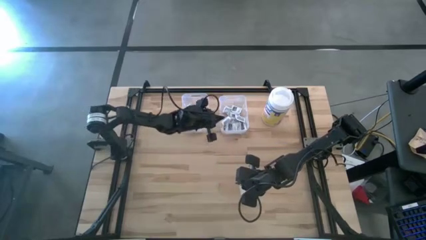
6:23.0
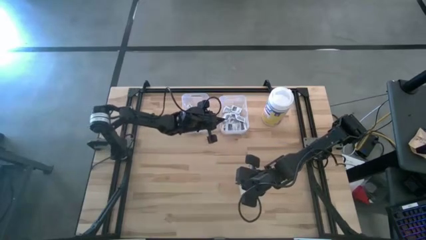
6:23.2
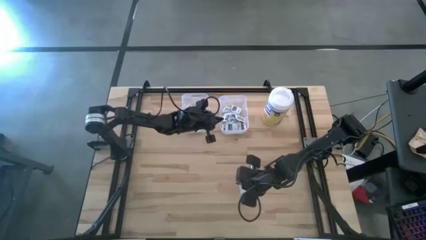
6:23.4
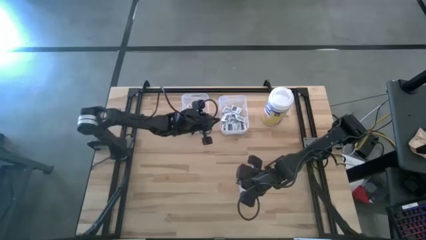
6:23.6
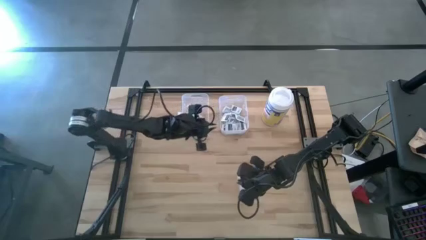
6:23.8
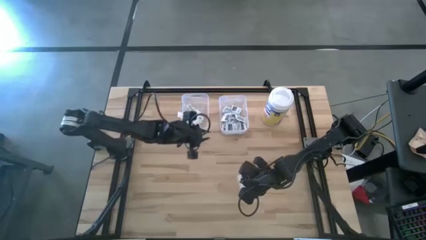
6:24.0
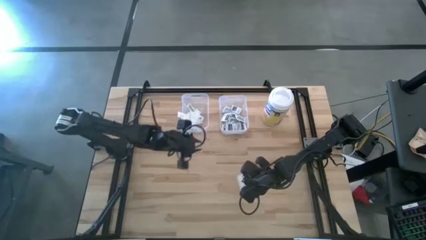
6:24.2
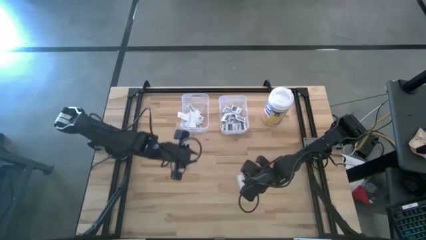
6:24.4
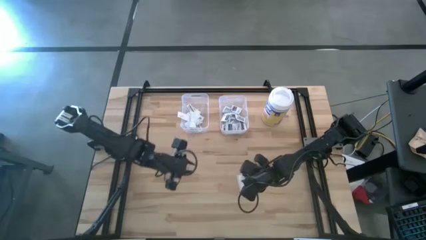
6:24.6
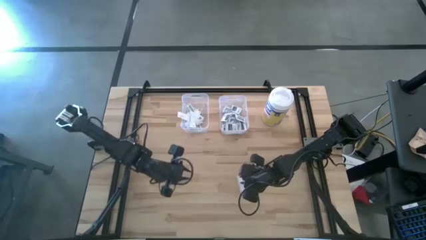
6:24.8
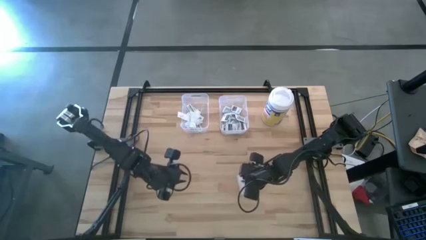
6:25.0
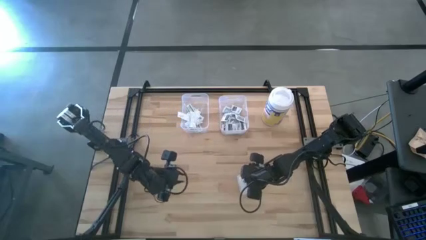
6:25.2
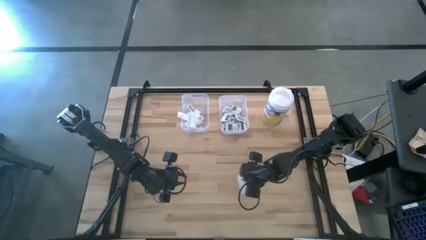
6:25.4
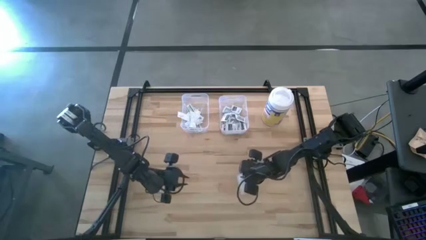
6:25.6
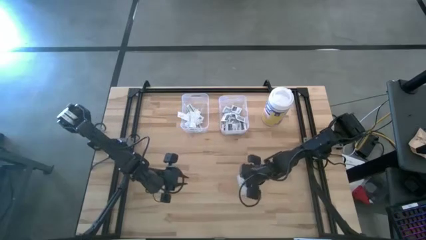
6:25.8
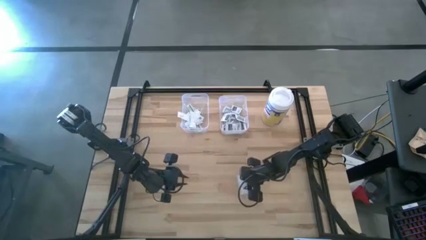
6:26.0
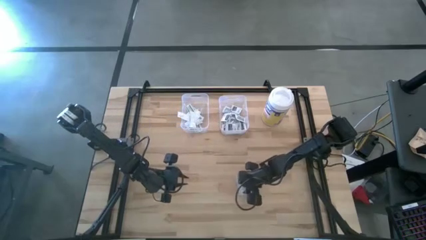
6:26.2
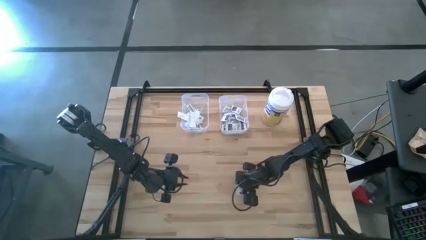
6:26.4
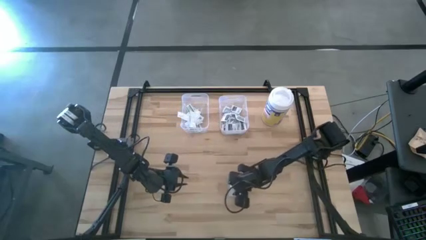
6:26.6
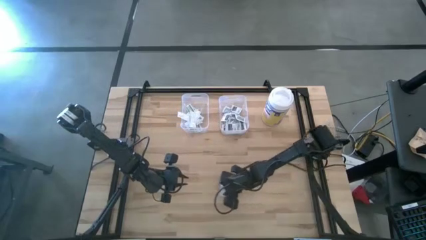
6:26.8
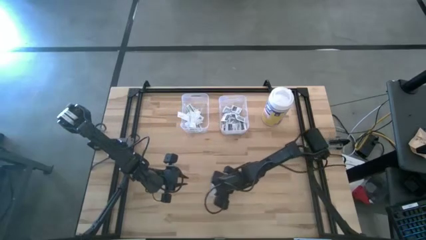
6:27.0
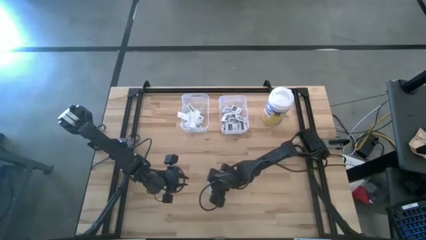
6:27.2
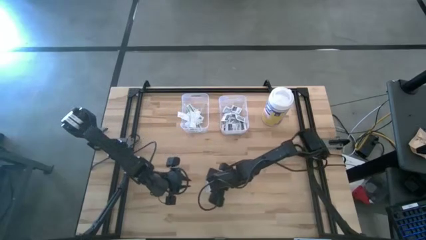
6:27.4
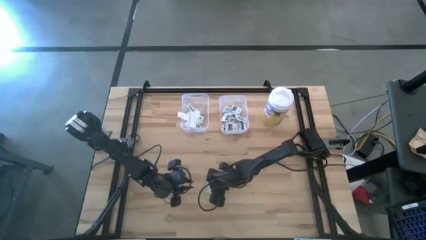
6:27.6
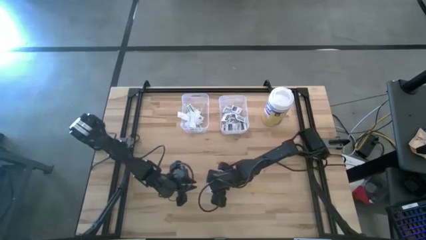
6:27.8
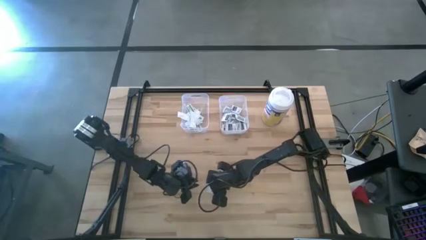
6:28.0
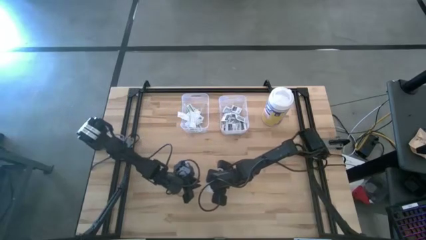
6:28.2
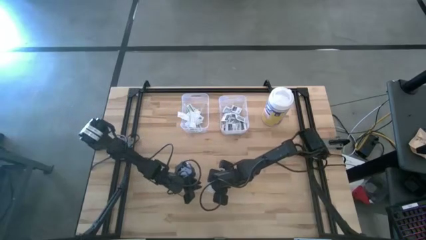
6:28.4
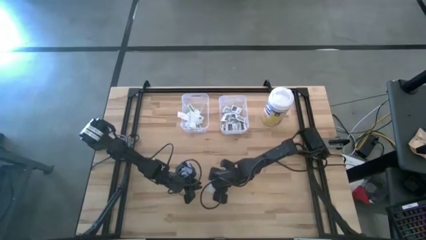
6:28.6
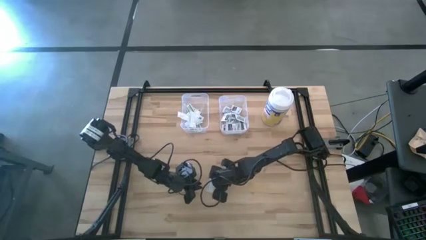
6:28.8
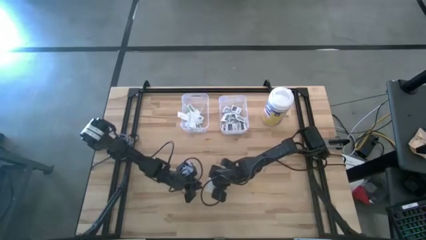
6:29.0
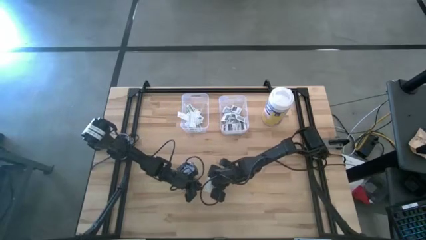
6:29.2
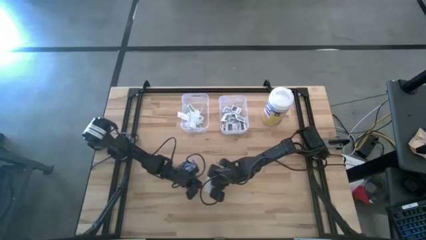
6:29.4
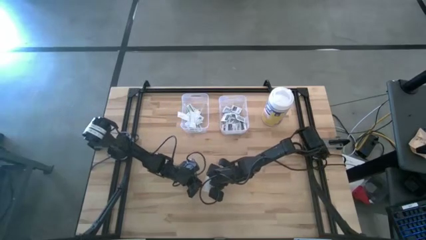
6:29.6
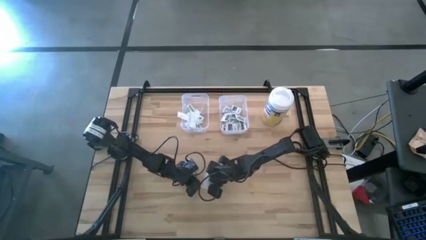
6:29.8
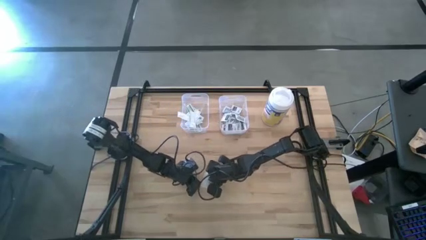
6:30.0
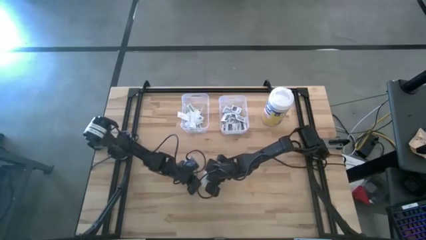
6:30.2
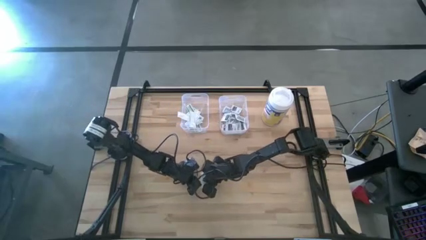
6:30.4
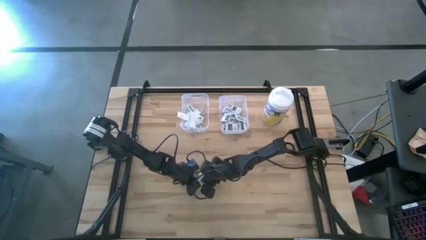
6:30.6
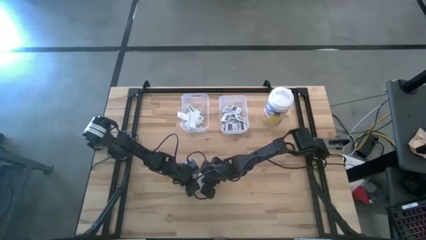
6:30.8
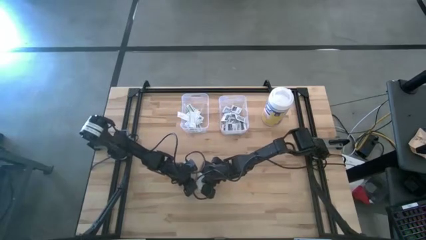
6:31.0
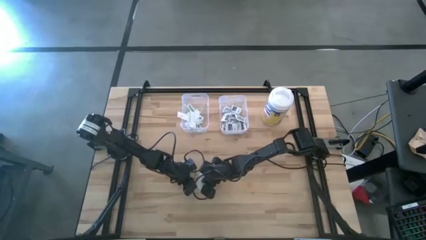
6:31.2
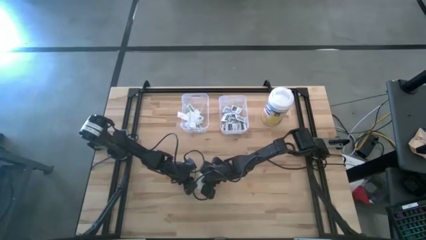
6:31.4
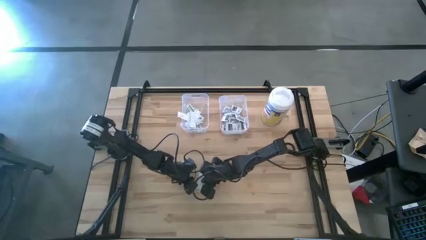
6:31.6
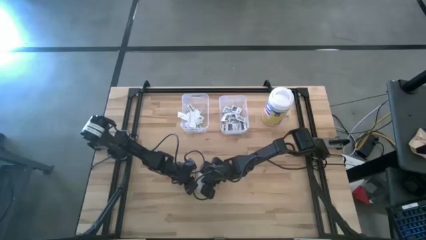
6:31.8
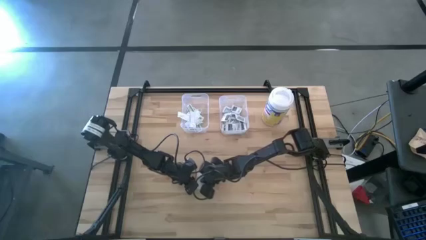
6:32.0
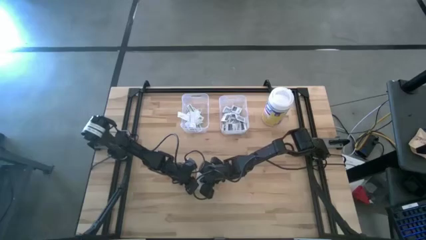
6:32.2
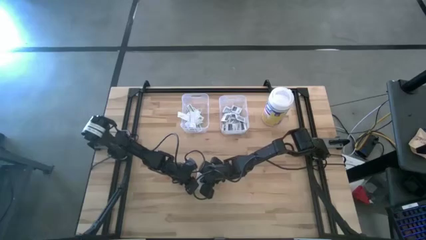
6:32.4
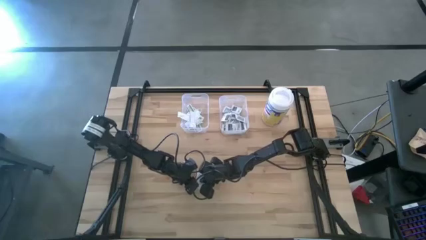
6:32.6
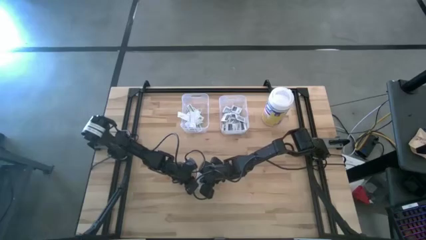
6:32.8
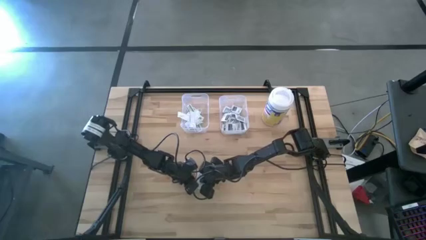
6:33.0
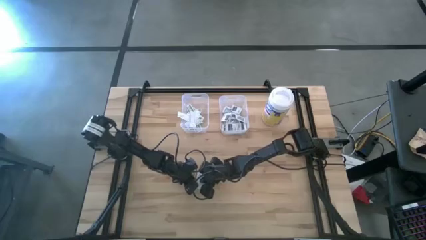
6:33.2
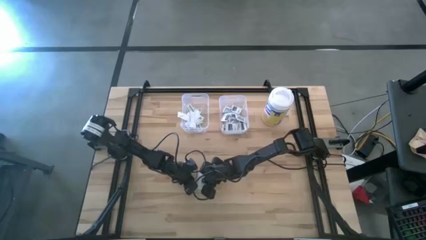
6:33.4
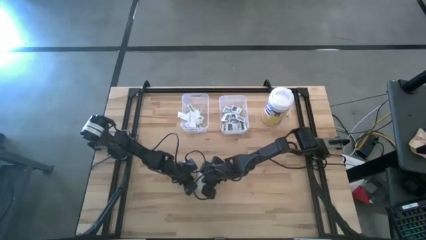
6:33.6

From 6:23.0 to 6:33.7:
Task: Pick & Place First Aid Supplies
Put the green bandage pack into the left transparent bin

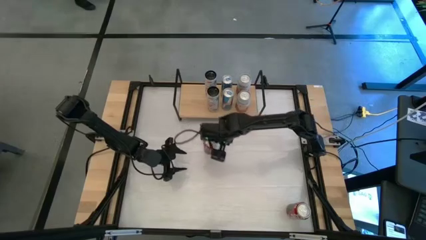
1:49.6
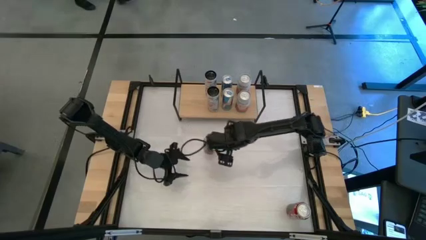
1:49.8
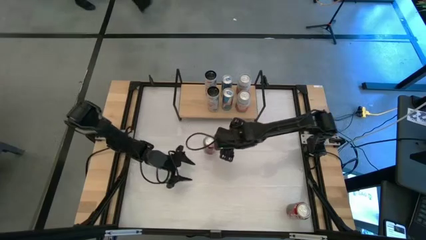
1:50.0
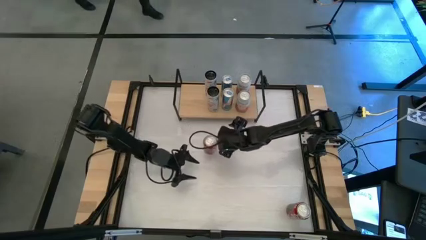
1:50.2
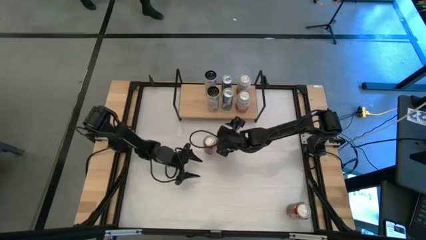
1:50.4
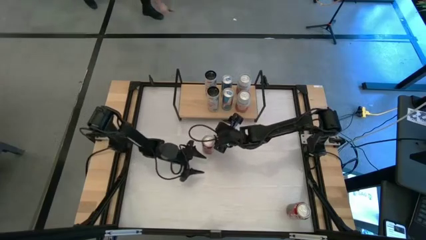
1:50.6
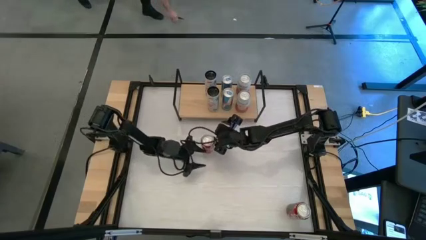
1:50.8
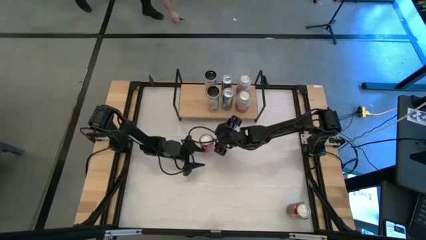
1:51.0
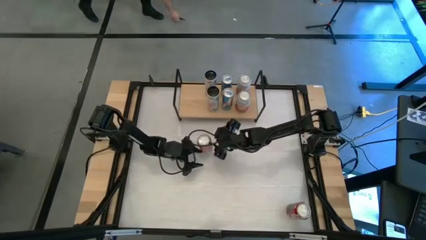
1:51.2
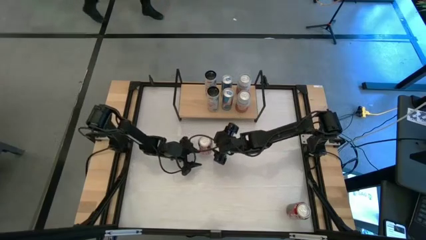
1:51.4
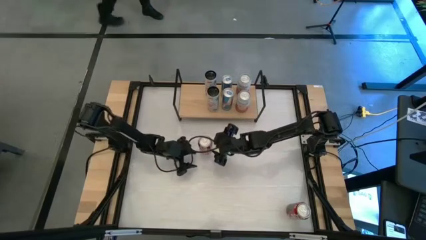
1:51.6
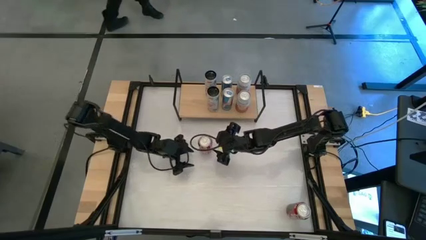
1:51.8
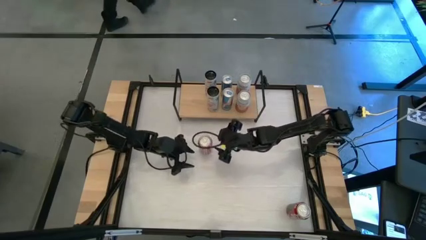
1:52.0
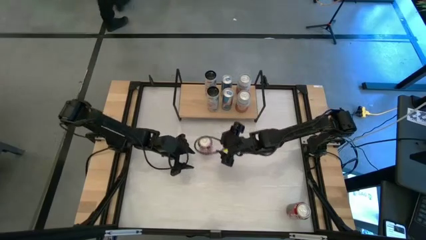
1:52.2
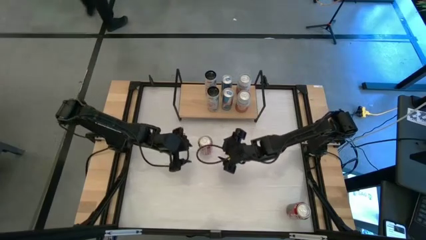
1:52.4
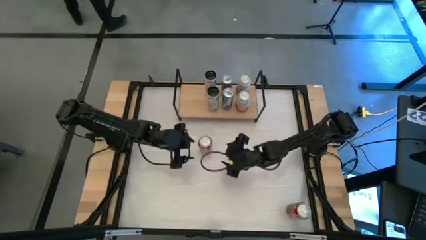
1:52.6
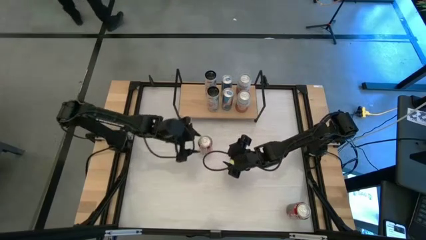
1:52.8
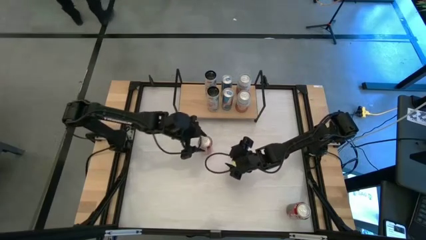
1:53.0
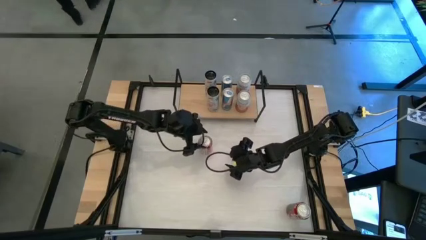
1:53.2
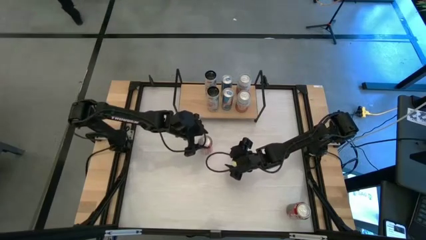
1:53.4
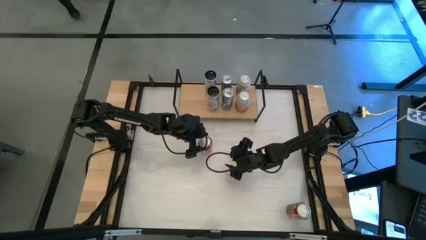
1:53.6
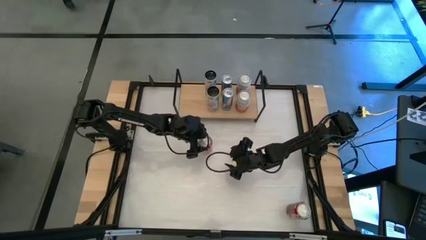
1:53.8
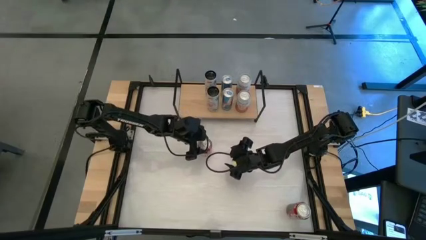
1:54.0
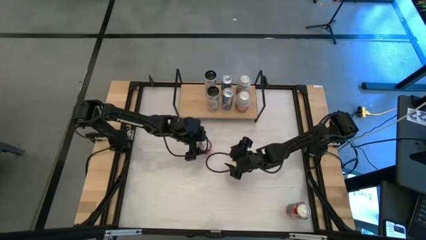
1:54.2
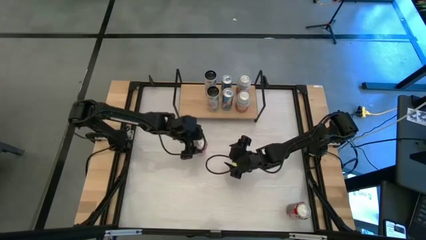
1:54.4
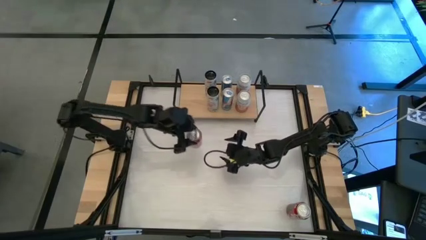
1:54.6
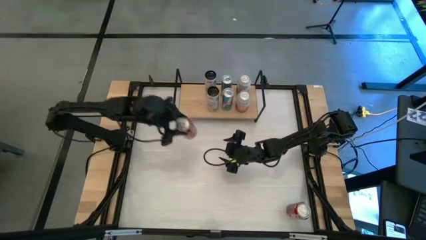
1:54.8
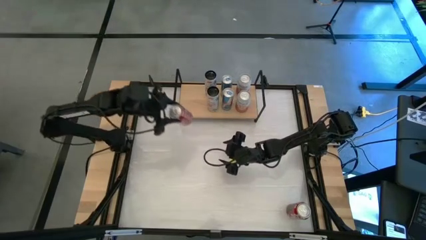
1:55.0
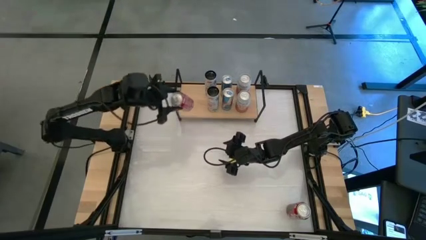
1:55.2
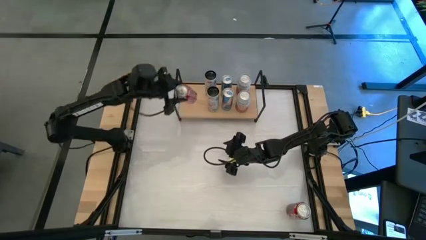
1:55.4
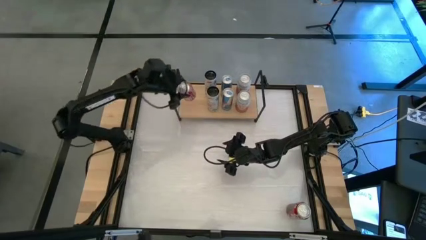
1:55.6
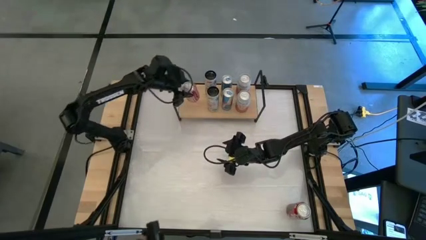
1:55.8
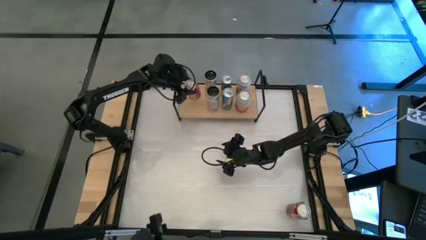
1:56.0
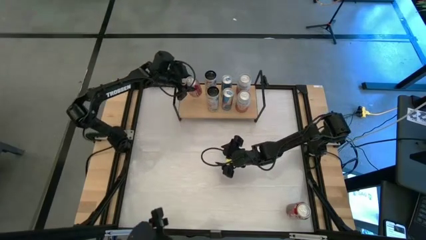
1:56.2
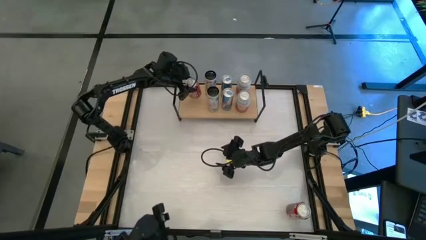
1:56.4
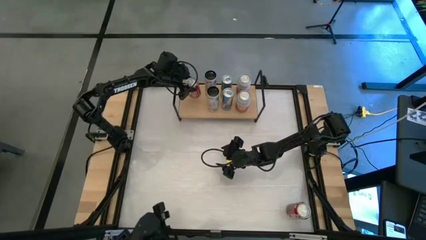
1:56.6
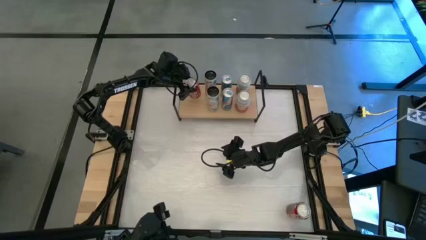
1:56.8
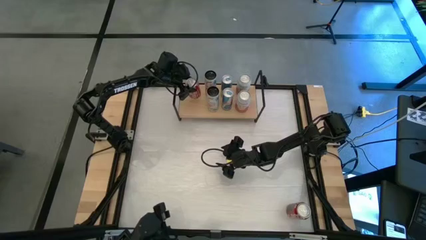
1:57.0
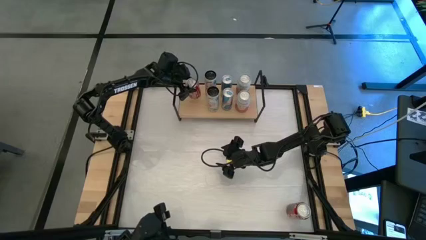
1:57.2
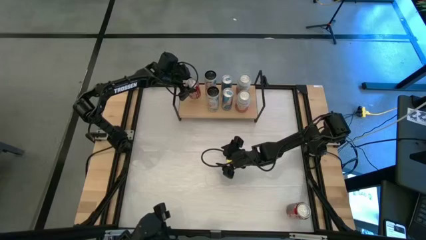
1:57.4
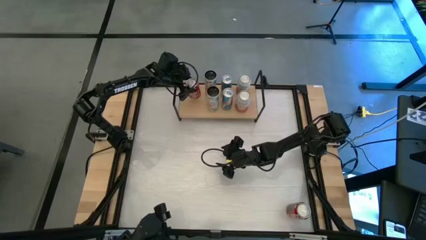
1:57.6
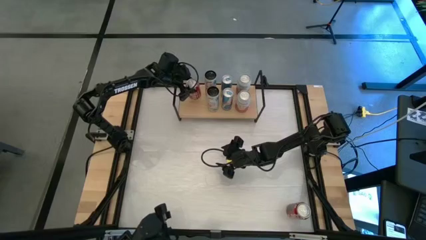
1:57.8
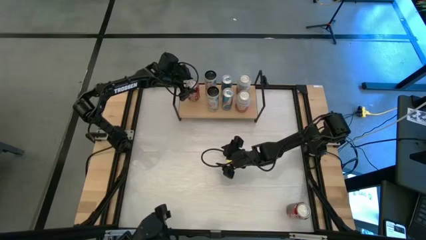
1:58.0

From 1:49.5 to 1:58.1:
Task: Place canned beverage on shelf
Put the top red soda can on the shelf
